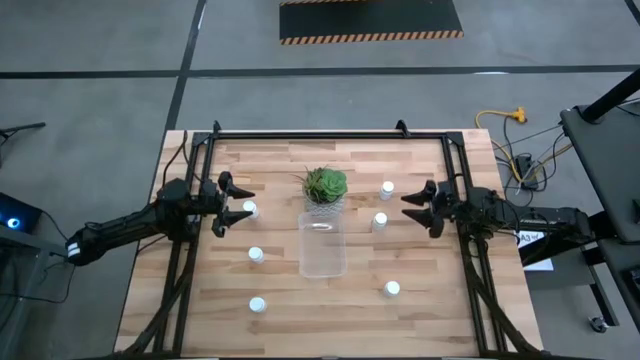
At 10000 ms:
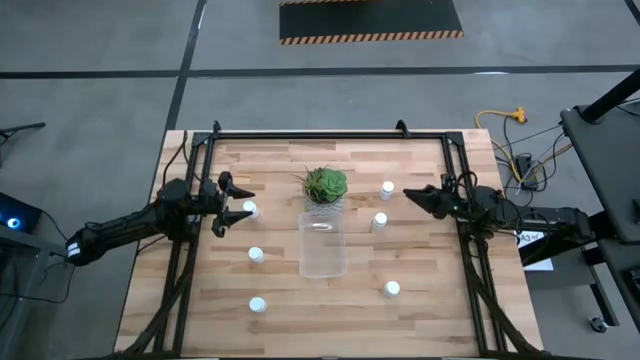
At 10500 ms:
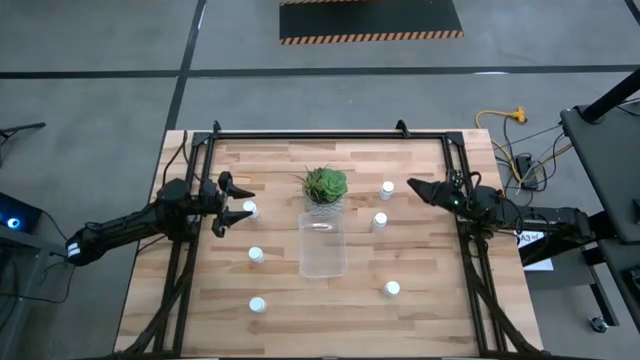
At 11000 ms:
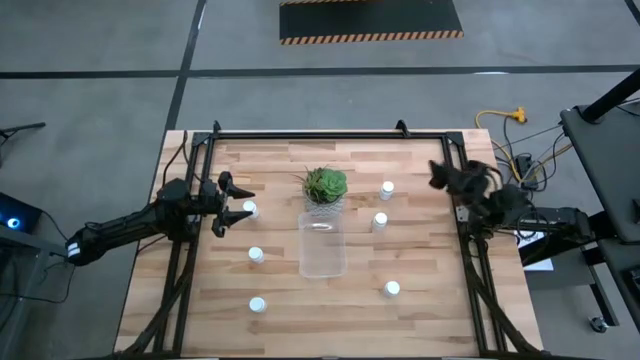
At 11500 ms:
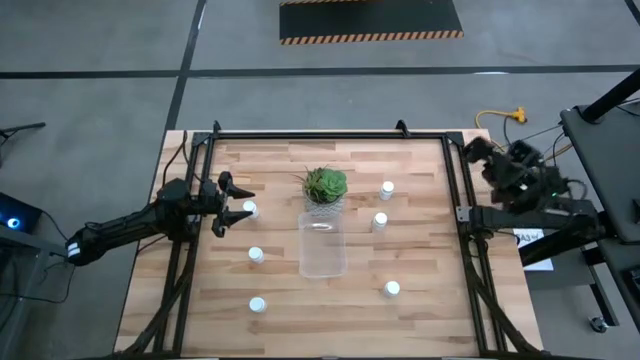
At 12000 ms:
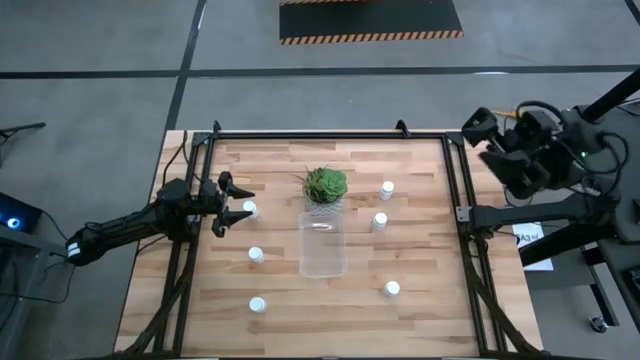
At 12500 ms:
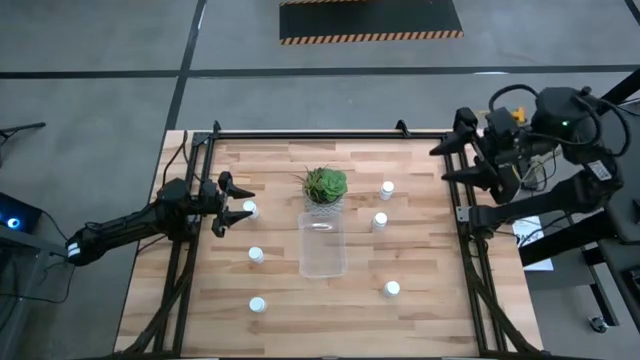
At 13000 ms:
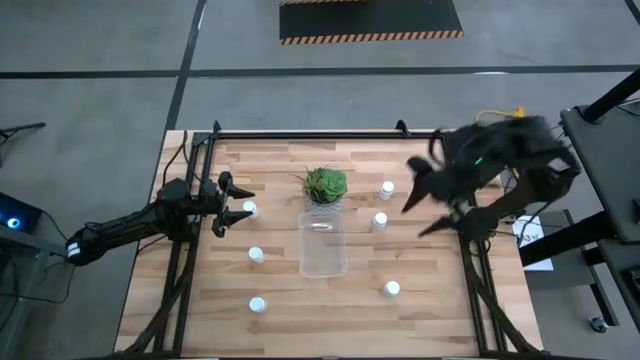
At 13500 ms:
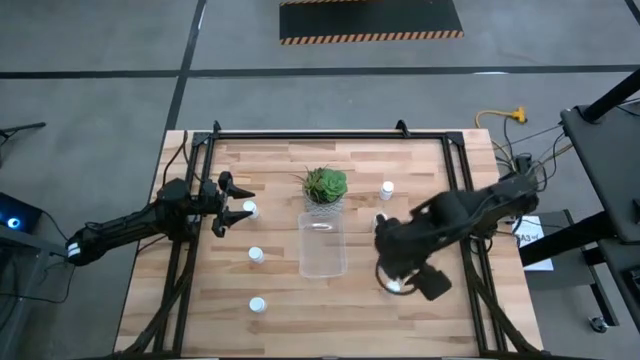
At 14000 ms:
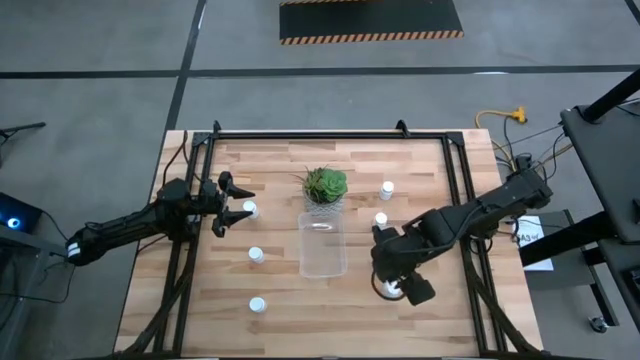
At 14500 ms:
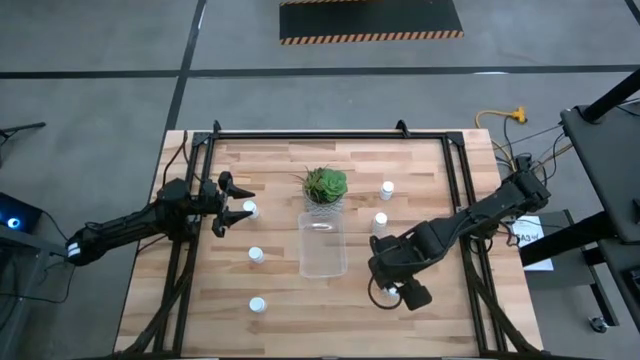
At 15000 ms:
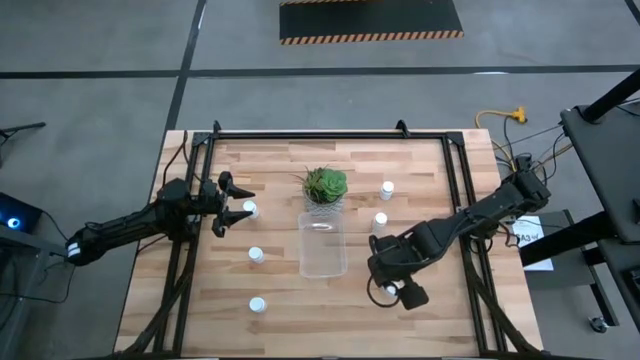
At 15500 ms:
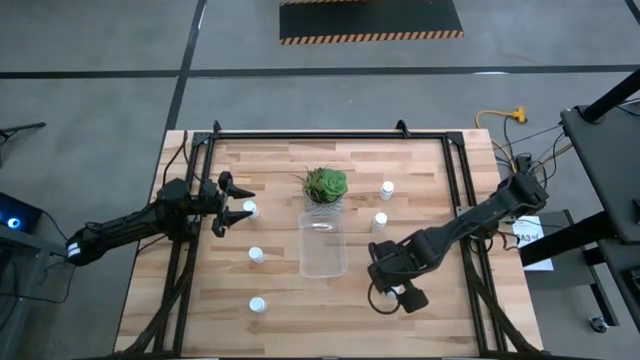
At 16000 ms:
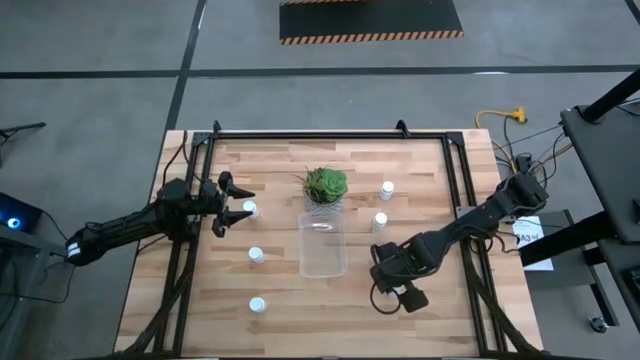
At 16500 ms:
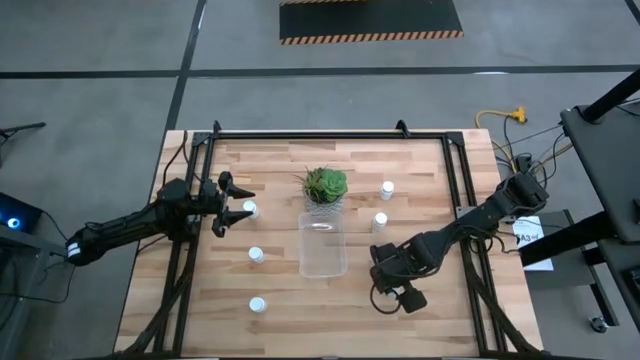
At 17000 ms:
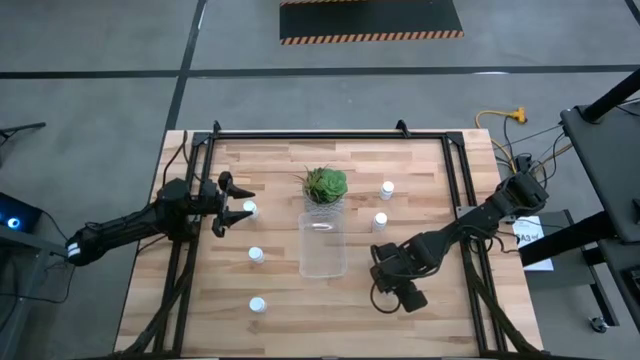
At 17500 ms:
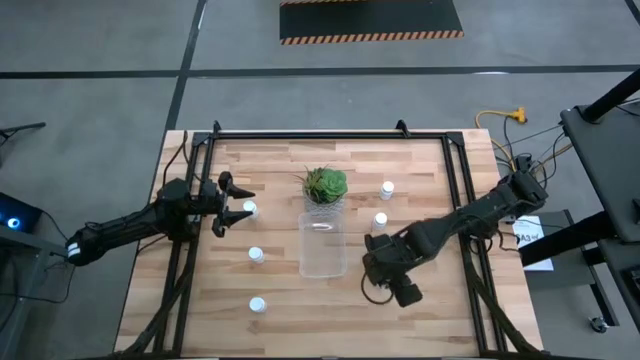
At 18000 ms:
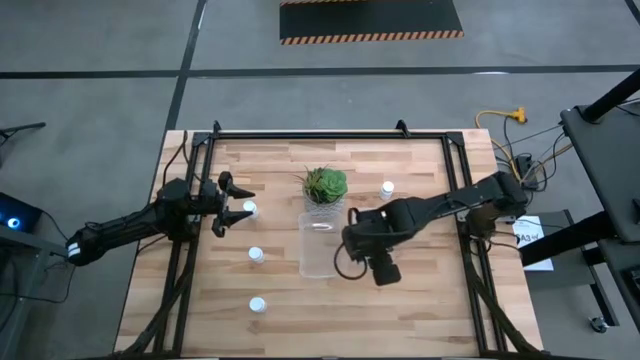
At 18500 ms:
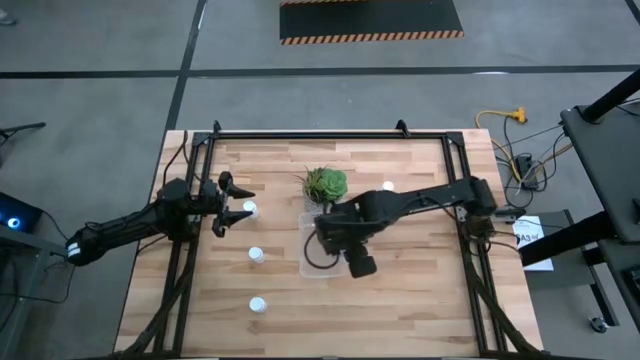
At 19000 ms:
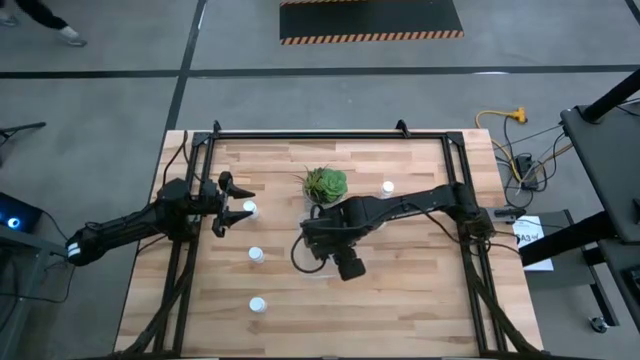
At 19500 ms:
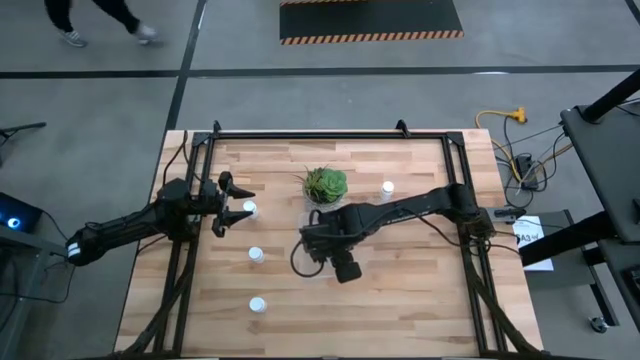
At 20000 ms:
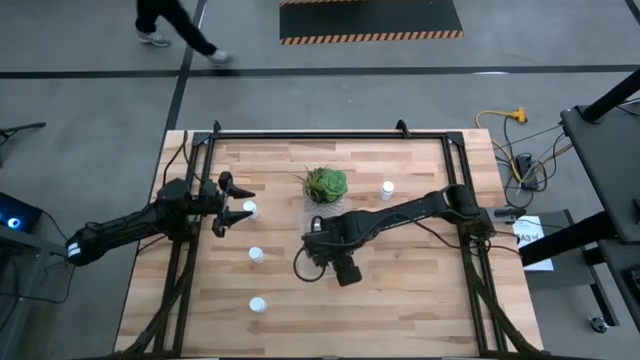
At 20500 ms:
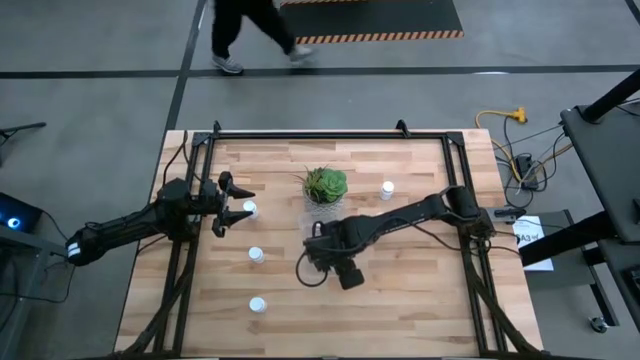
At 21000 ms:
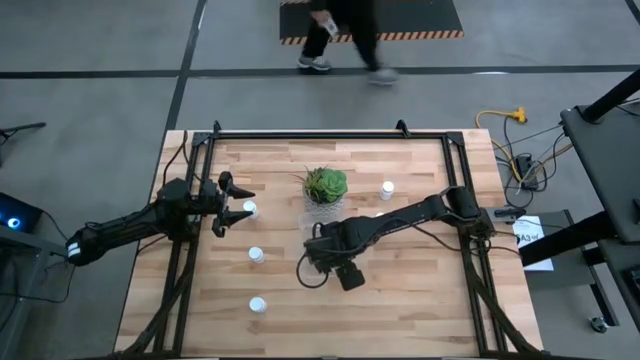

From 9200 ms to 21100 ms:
Task: Pick and place pill bottles into a basket
Put the pill bottle into the bin

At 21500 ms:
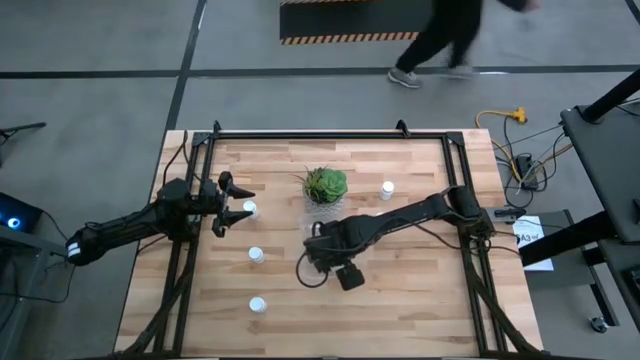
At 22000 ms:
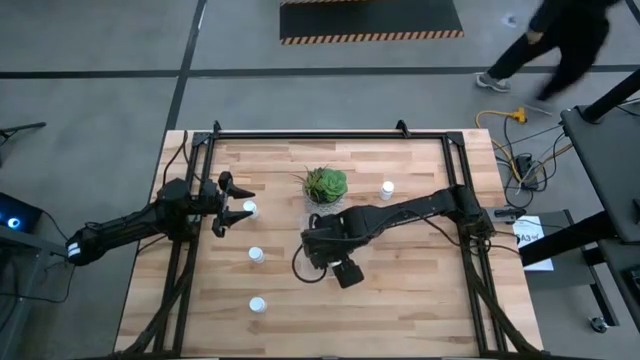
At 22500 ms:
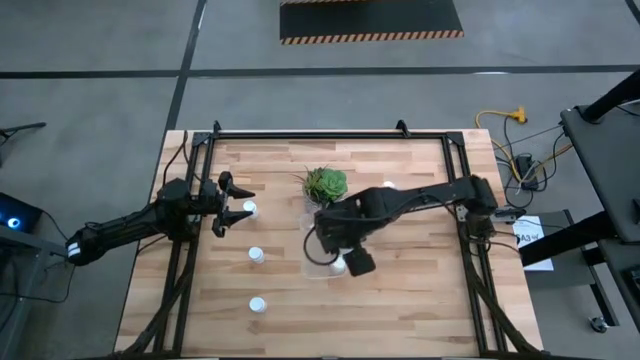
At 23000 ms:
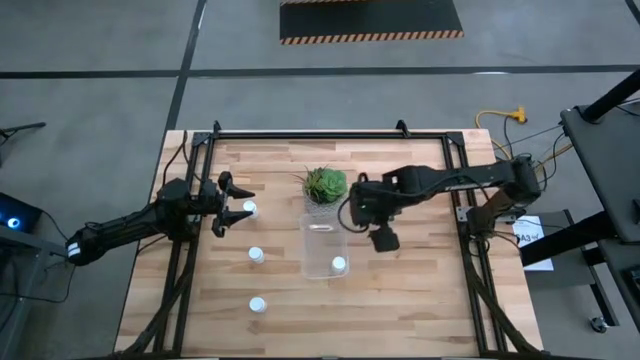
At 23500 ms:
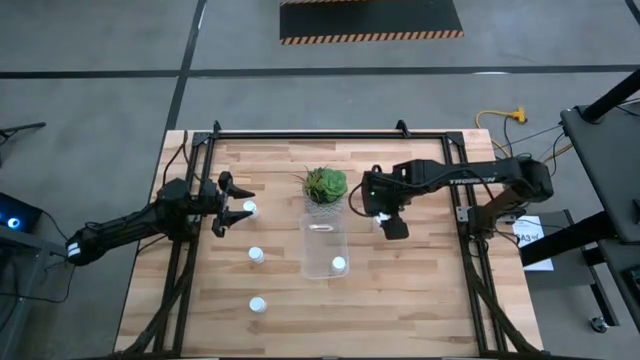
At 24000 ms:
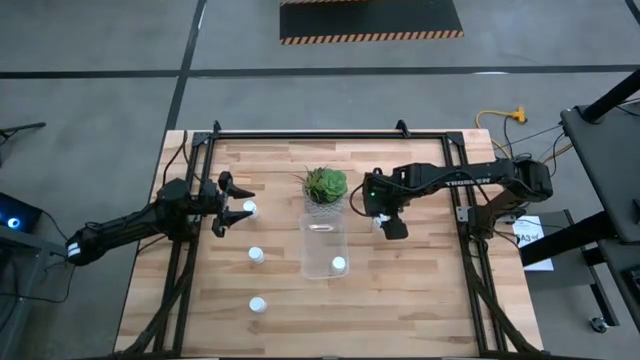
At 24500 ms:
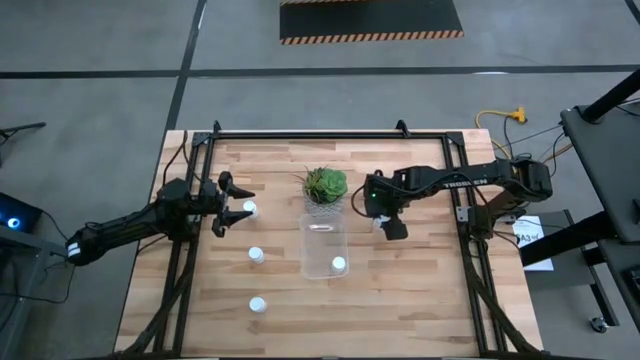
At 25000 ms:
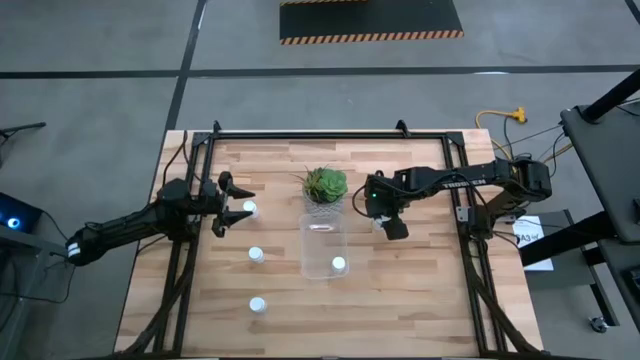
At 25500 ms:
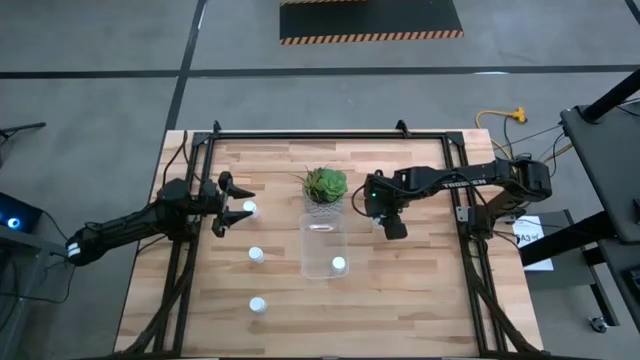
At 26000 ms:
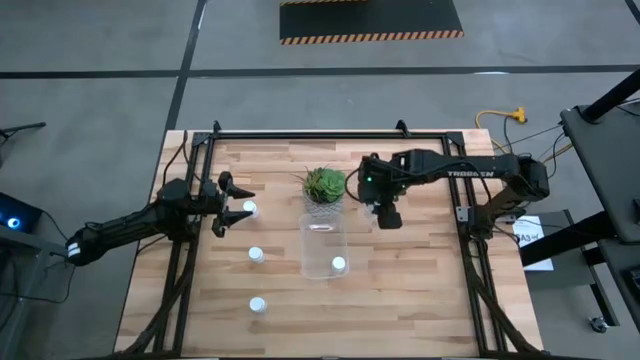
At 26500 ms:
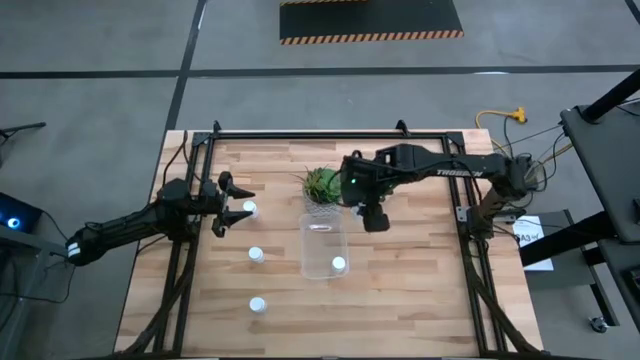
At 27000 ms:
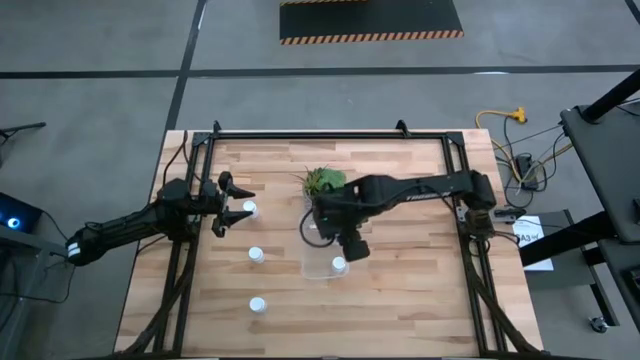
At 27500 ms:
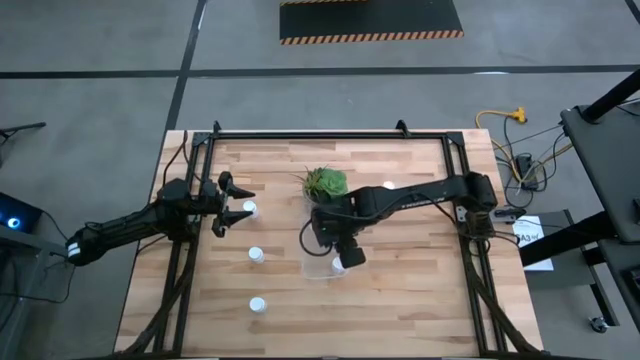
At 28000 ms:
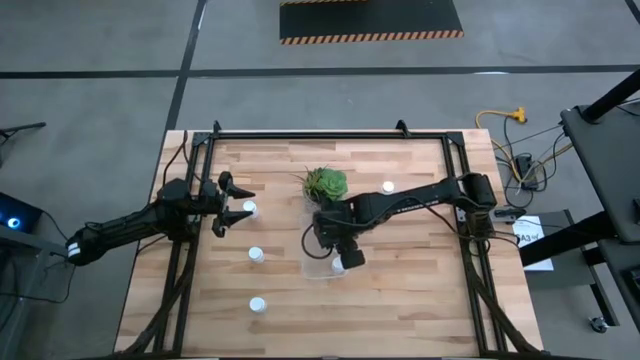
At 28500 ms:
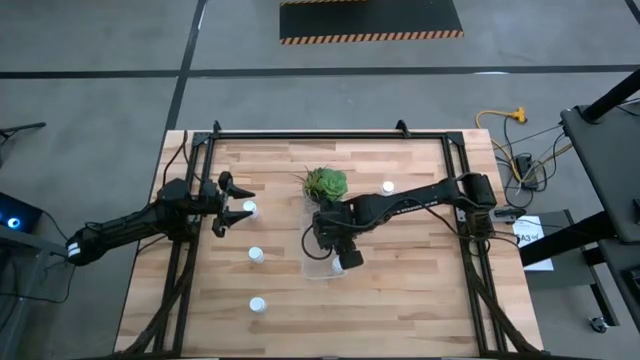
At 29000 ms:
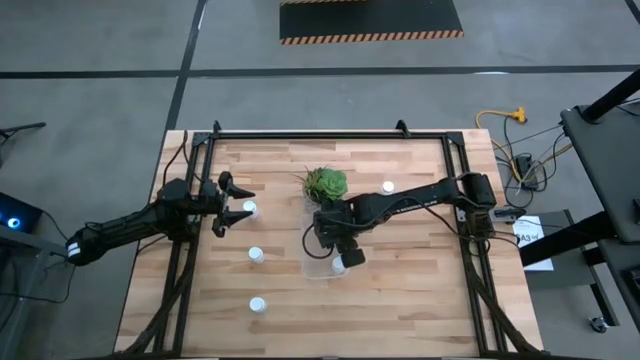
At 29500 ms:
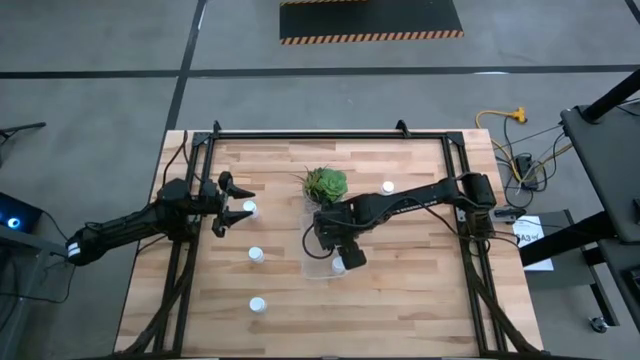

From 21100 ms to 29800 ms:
Put the pill bottle into the bin
